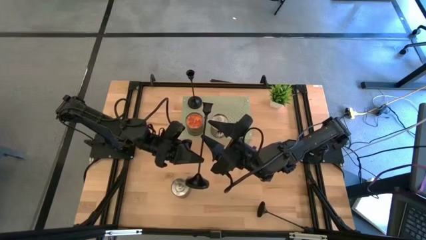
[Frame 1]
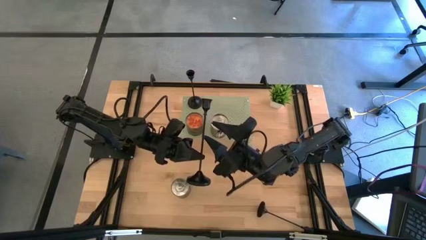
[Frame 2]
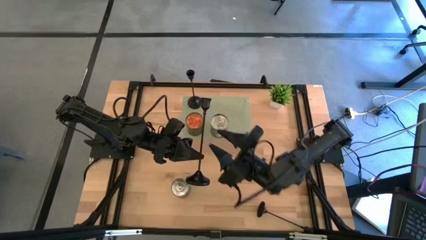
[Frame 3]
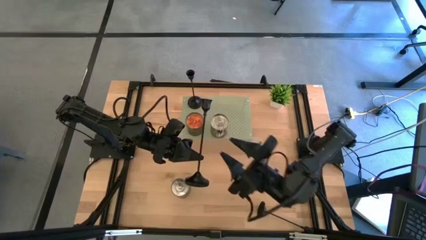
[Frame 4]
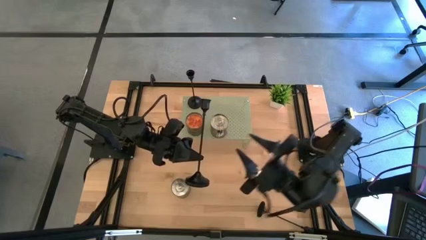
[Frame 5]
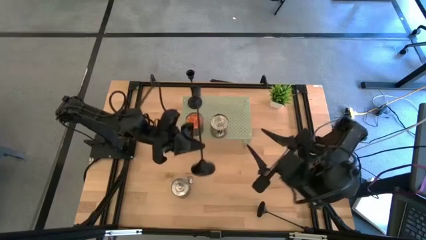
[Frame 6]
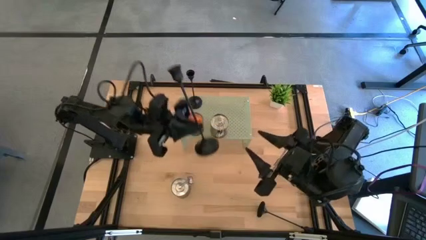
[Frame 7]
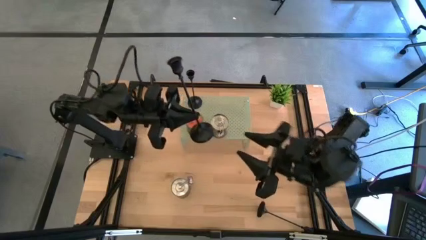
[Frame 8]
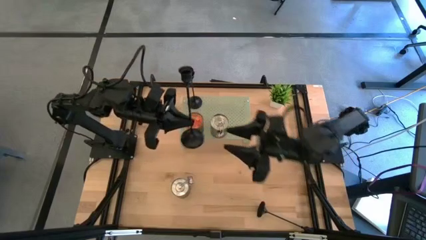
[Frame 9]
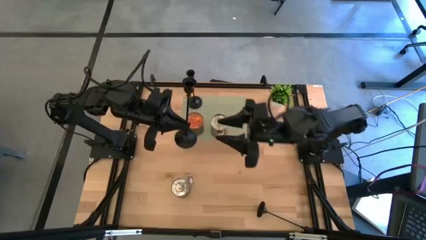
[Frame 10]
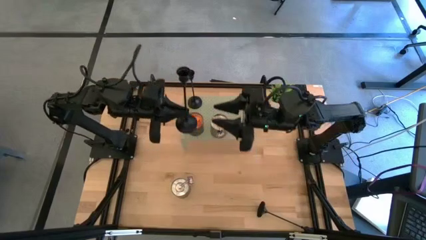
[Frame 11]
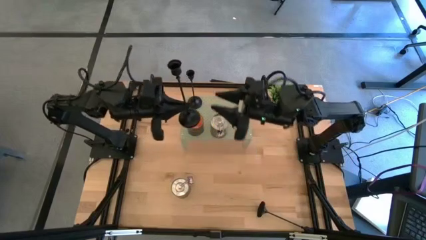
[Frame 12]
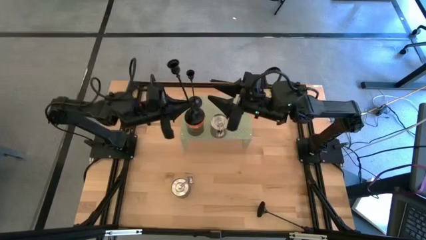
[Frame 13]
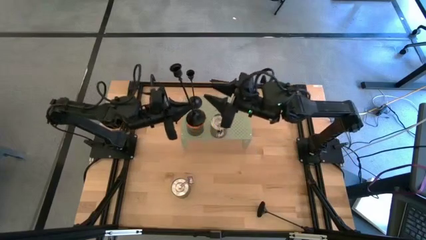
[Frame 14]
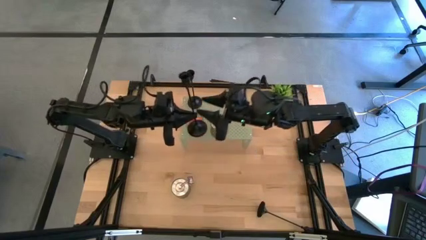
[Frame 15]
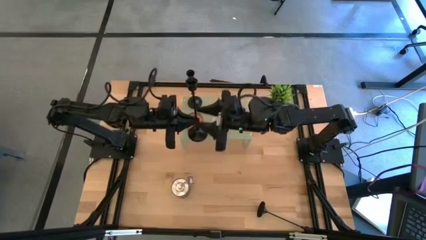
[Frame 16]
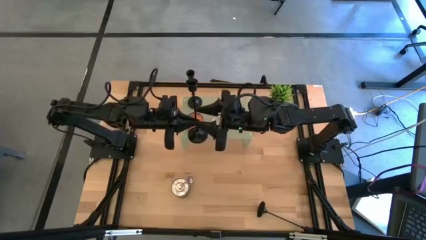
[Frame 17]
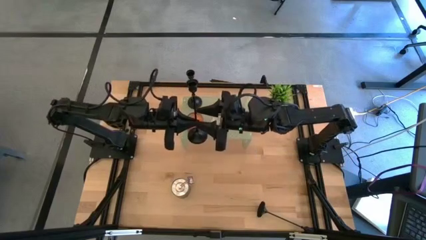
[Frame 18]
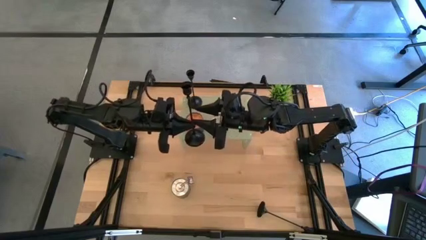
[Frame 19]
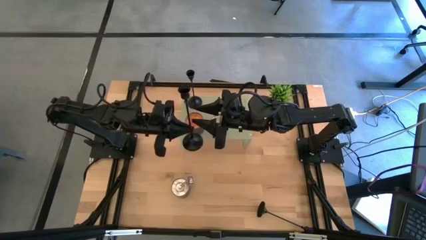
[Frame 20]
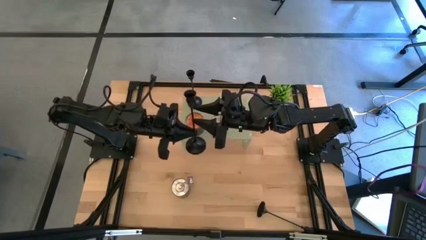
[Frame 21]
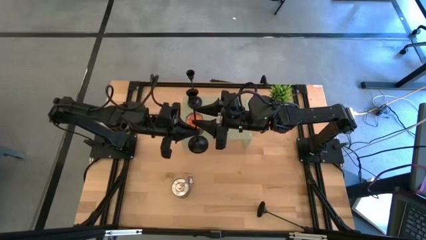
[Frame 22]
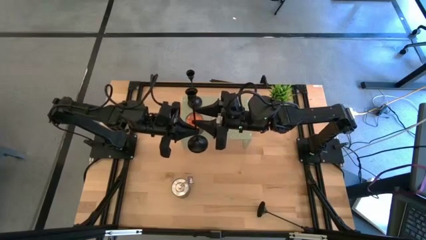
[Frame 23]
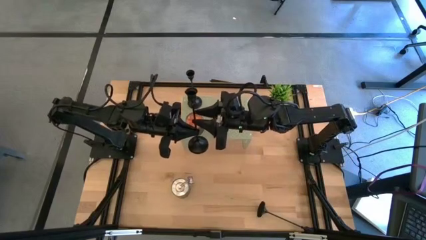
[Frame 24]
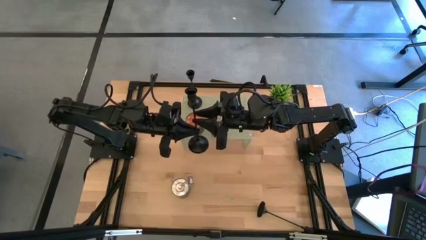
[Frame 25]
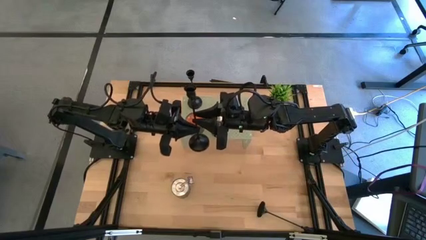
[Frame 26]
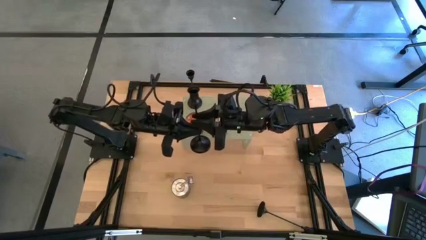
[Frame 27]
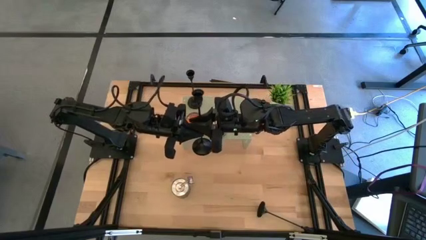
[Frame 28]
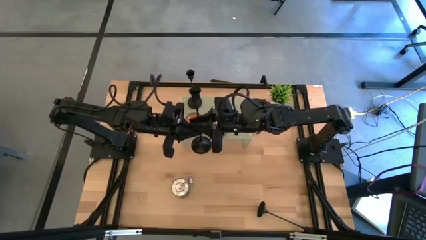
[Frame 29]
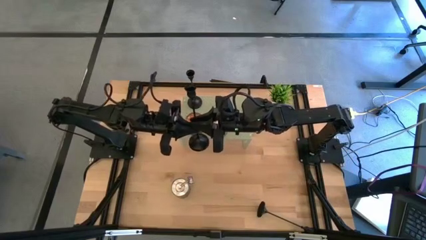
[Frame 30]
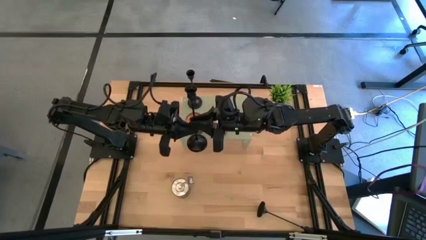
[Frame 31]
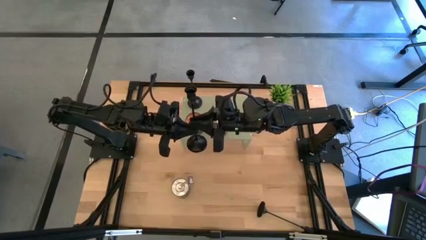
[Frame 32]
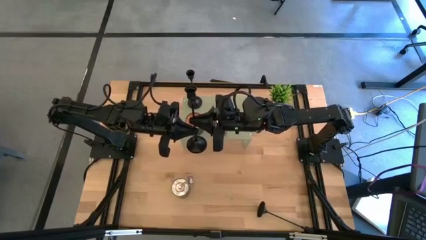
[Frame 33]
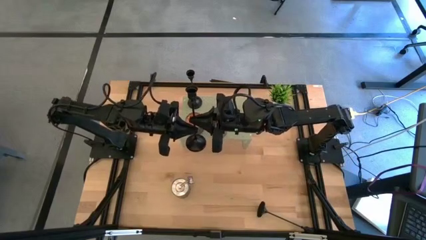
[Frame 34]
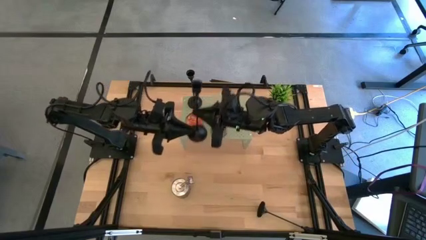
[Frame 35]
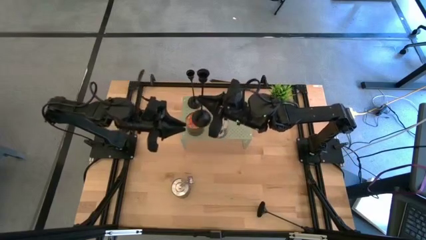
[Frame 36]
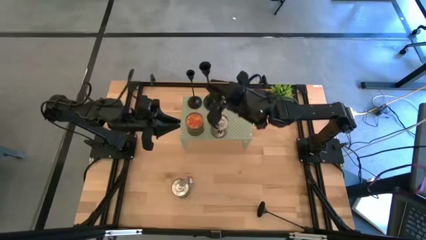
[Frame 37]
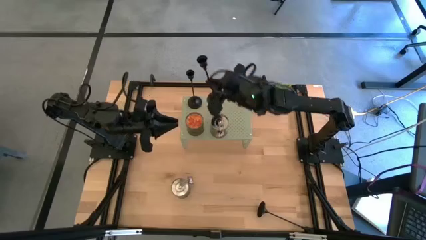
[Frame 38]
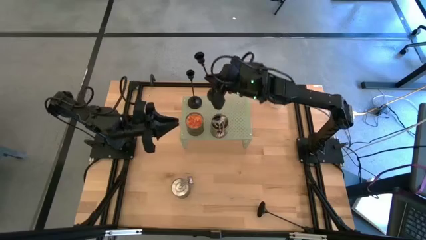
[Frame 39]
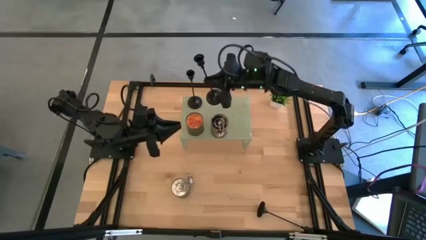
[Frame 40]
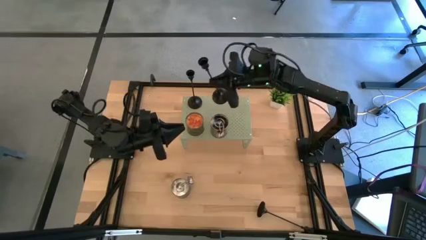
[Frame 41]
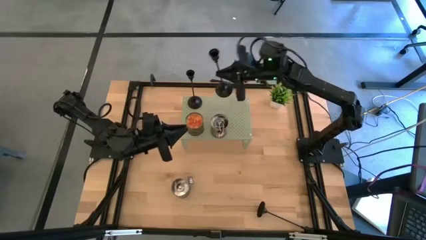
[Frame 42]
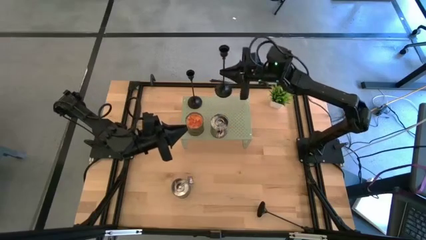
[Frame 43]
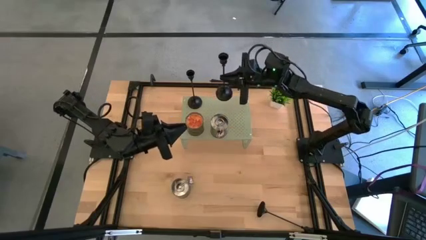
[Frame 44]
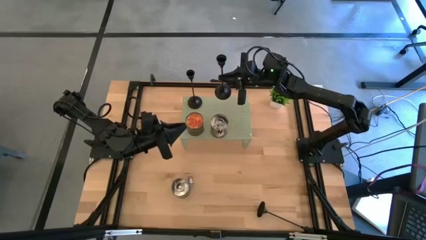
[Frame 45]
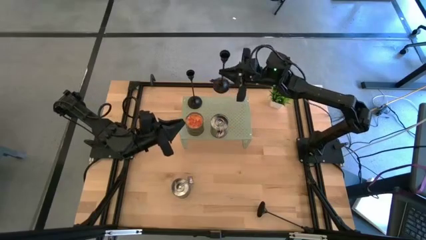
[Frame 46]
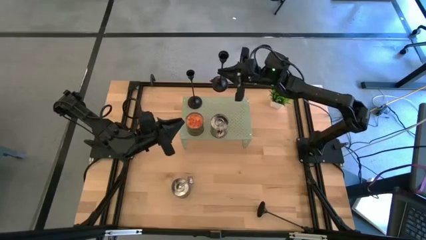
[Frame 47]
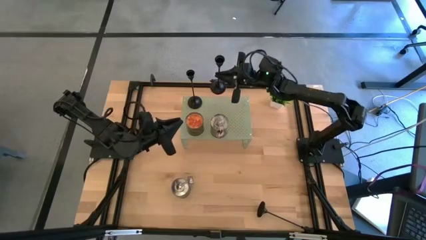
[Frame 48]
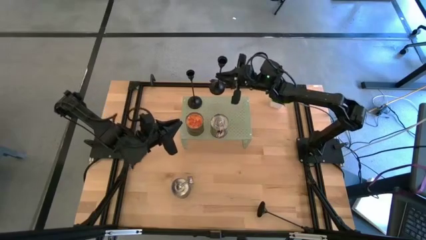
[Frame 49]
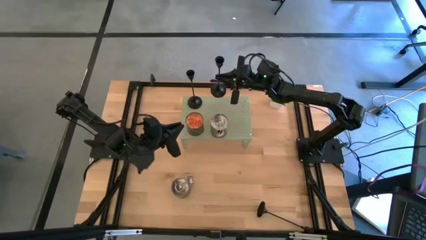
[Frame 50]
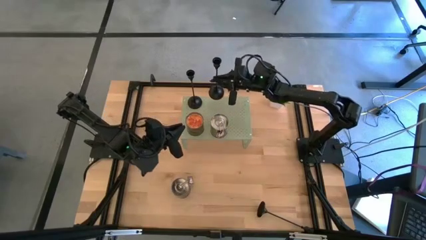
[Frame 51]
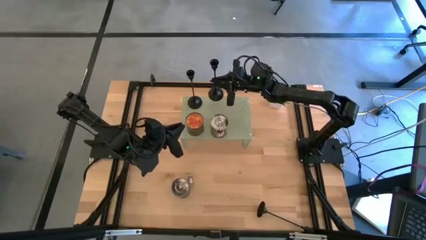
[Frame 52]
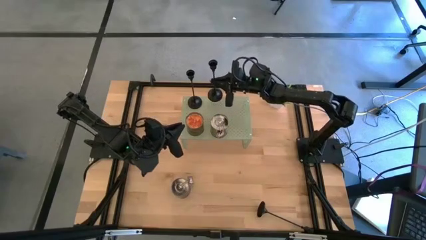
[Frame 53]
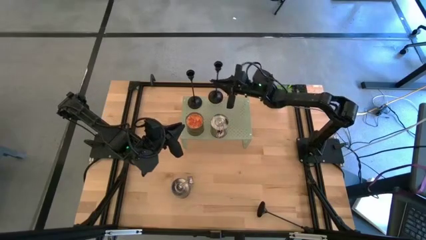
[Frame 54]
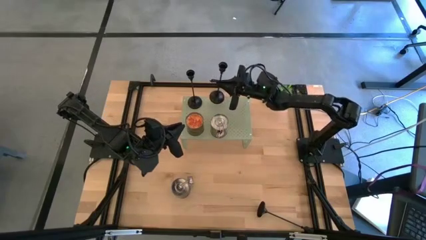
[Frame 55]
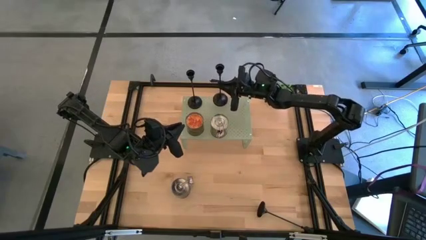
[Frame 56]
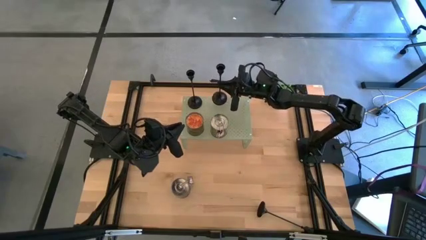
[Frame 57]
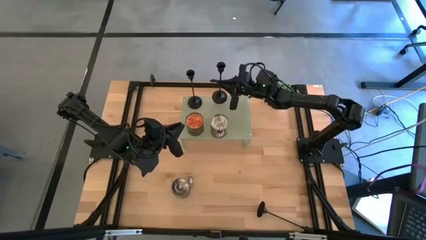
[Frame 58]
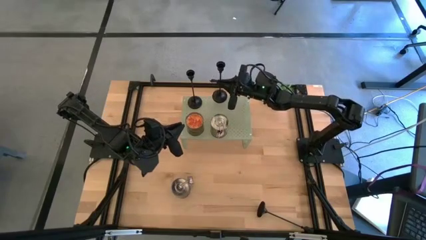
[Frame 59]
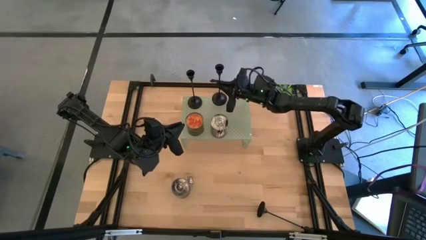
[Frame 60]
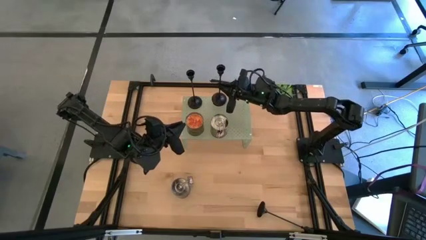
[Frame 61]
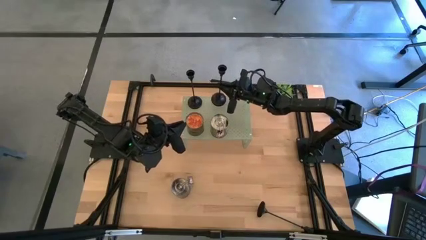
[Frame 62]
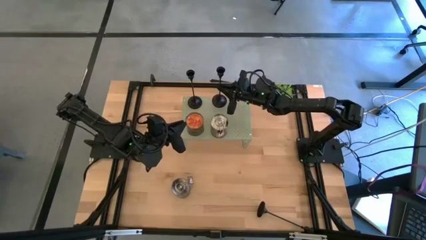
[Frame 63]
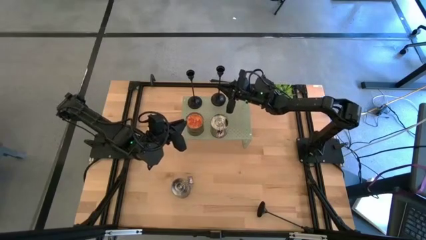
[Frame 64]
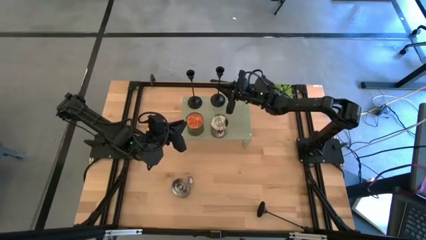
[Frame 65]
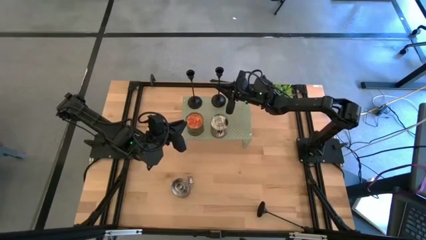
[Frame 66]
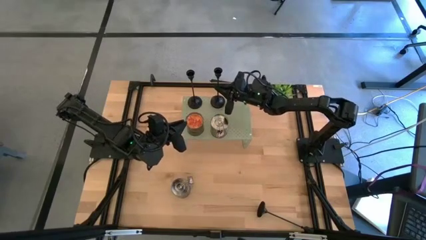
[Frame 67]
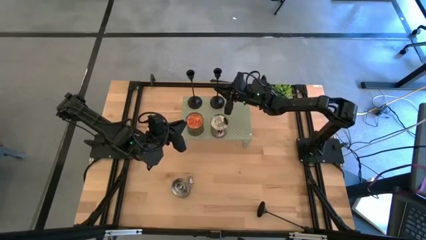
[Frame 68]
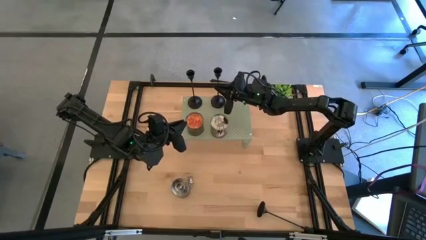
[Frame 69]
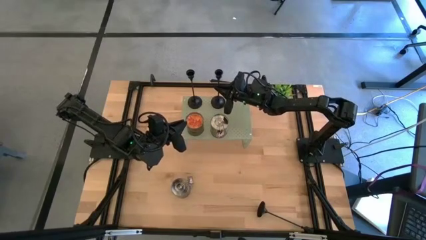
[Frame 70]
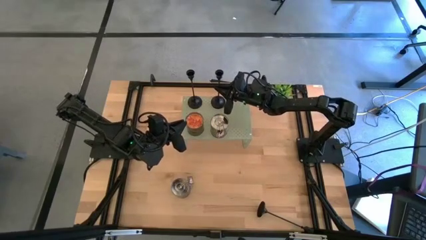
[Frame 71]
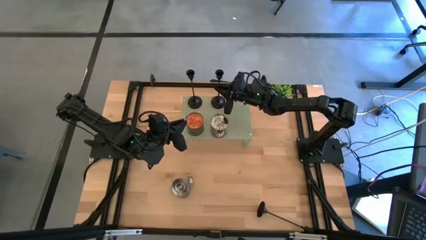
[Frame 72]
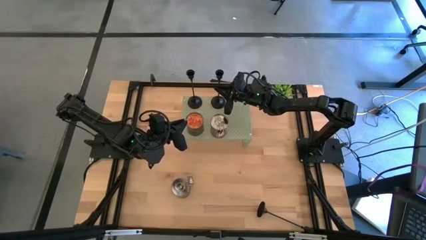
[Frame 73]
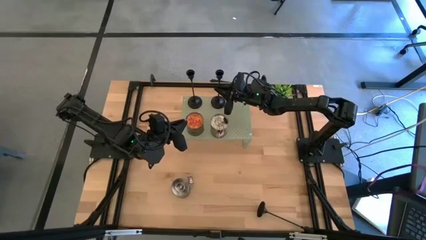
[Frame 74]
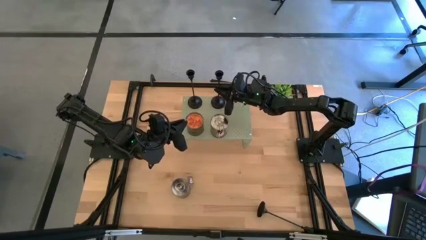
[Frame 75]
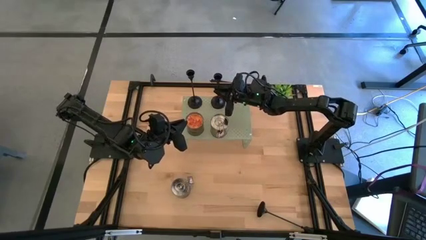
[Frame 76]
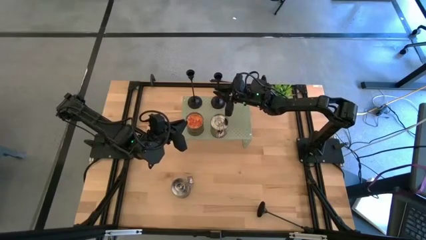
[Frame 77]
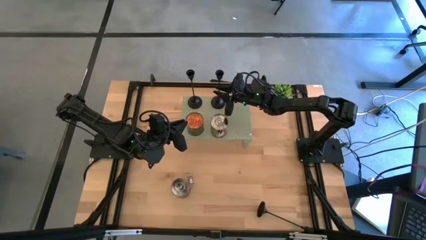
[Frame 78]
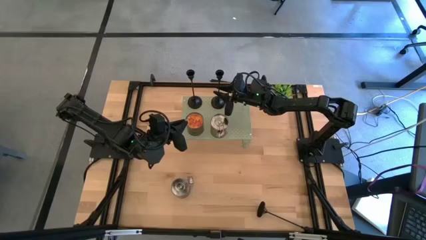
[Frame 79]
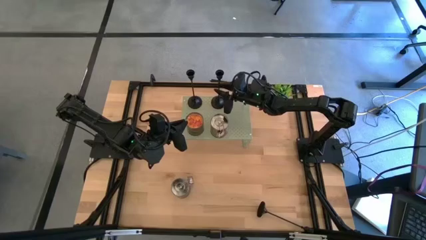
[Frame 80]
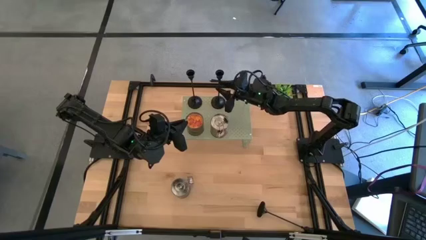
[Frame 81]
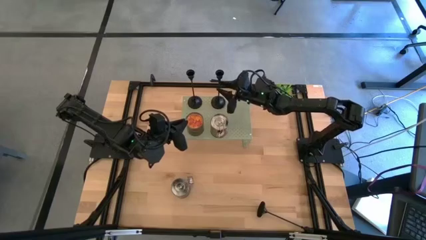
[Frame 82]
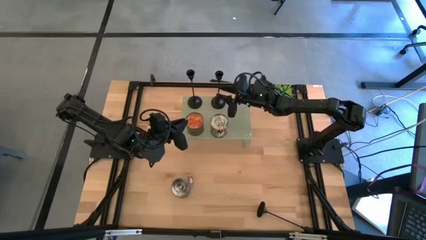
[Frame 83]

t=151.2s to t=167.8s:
Task: Pick & Place candle stick holders
Put the top candle holder on the shelf aligned with the other candle holder
